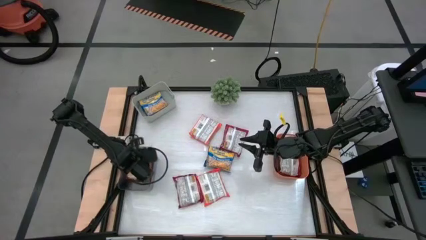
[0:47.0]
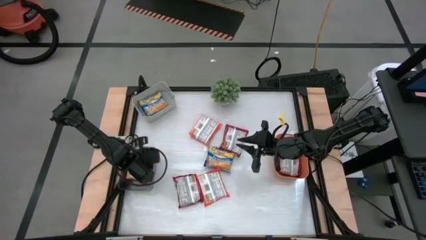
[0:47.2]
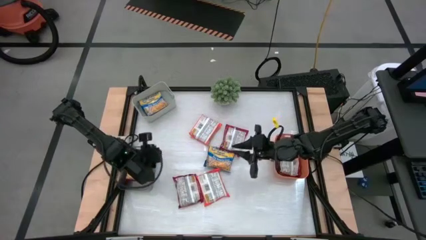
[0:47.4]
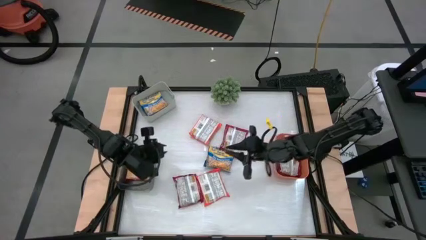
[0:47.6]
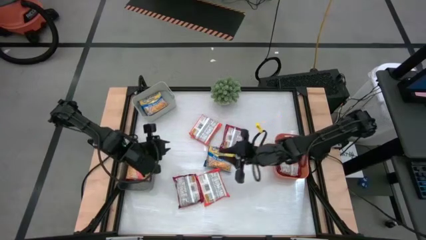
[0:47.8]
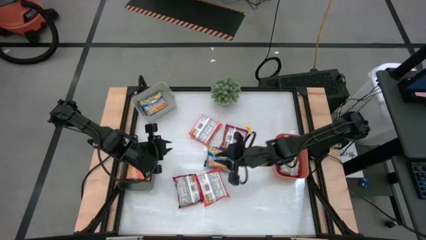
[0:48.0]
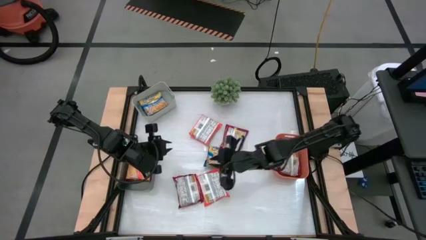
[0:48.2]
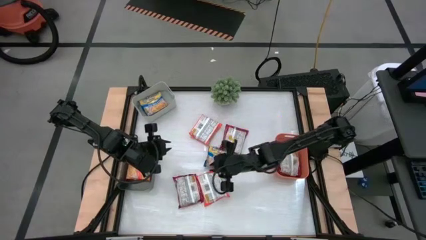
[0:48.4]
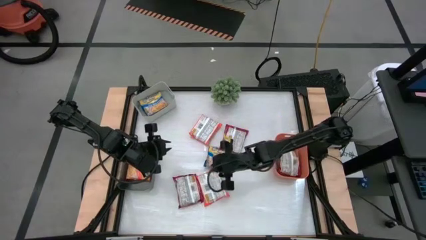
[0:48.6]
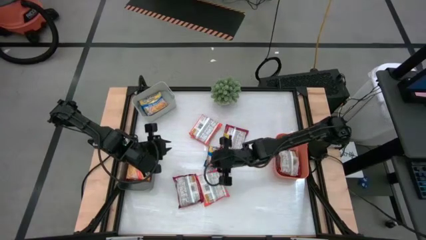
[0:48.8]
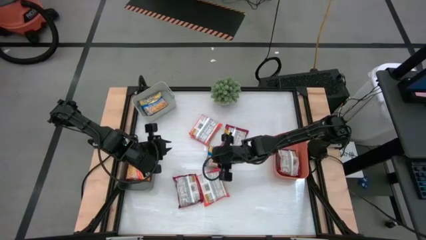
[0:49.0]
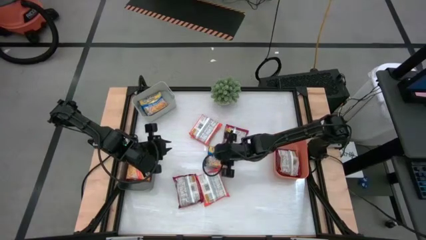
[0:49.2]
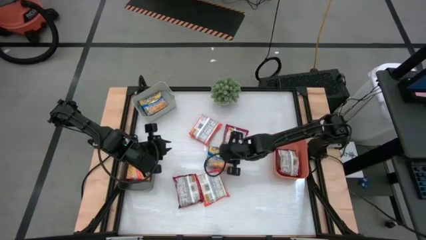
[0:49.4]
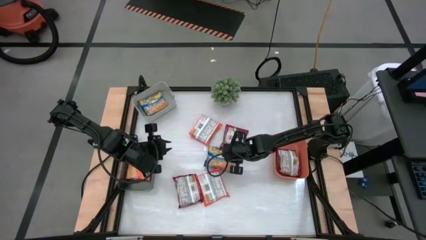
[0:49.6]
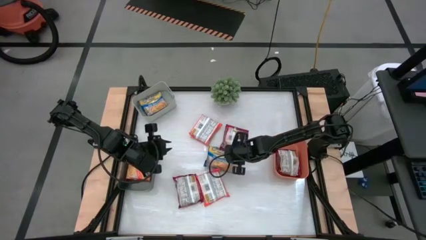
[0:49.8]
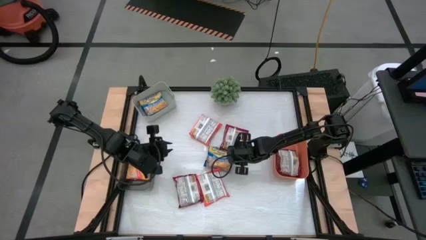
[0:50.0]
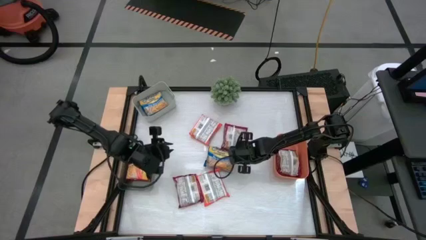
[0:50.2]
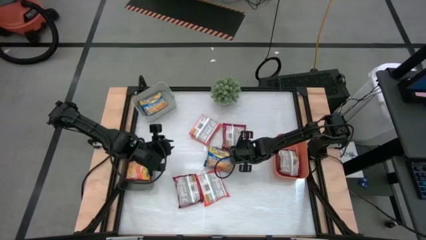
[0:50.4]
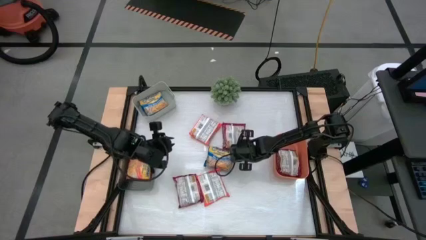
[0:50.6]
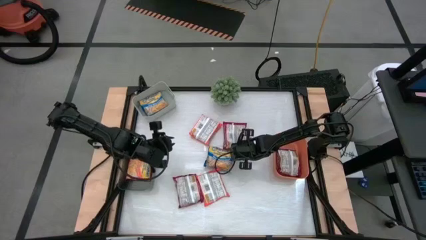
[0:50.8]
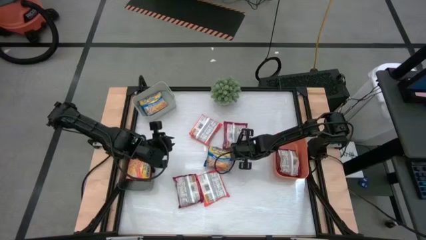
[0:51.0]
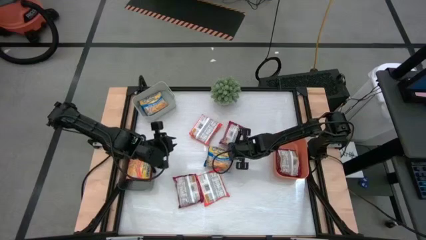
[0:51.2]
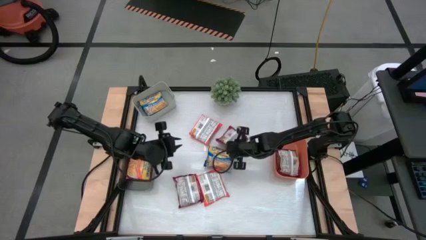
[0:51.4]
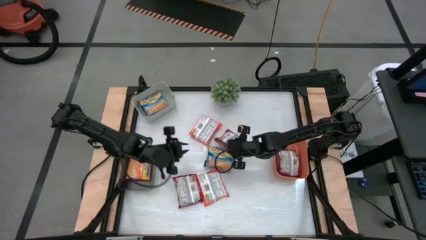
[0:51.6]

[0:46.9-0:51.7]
Task: Sort Maruchan noodles
Put the red bag into the orange bin

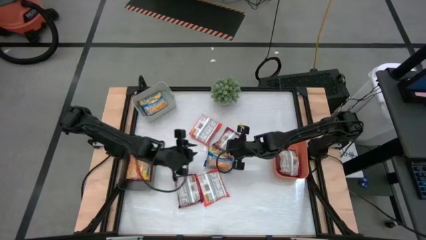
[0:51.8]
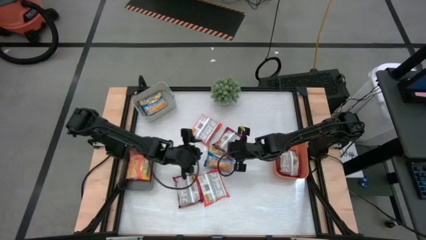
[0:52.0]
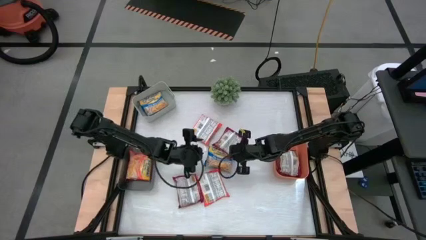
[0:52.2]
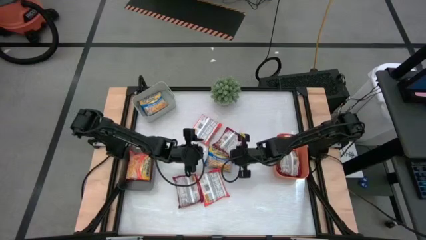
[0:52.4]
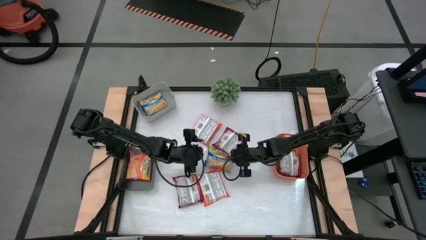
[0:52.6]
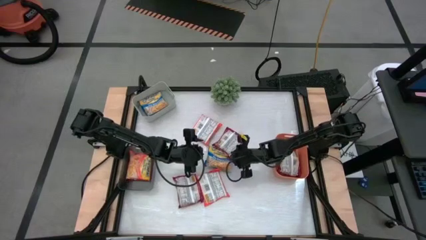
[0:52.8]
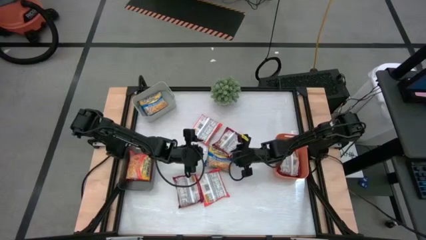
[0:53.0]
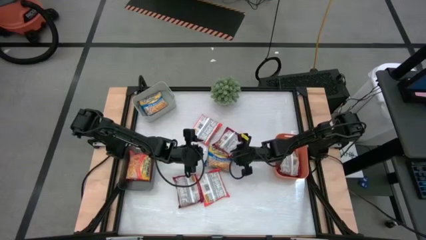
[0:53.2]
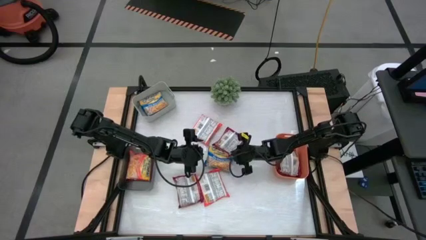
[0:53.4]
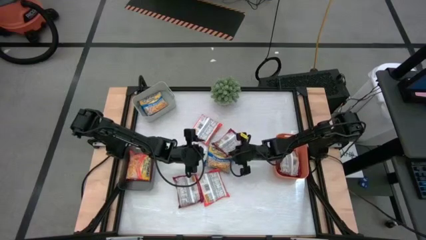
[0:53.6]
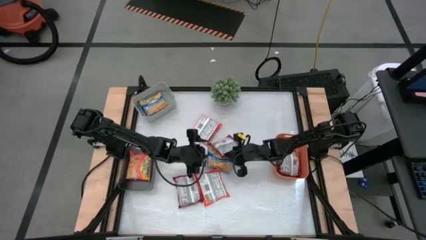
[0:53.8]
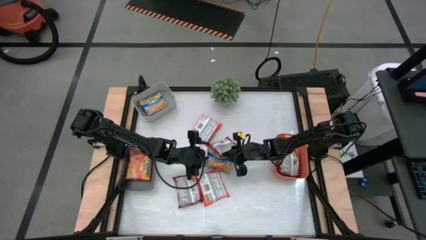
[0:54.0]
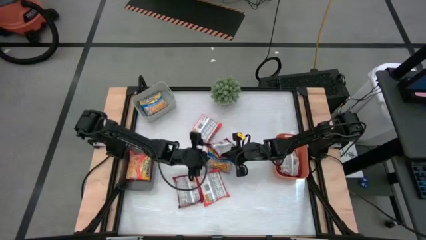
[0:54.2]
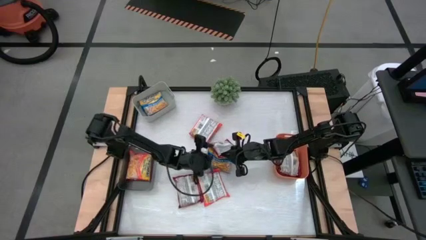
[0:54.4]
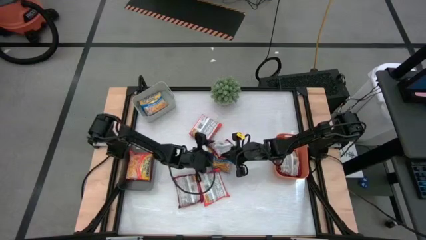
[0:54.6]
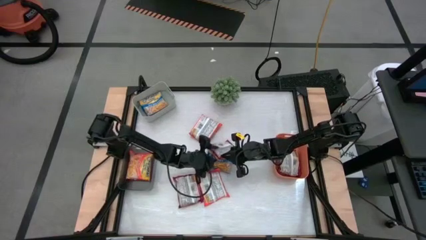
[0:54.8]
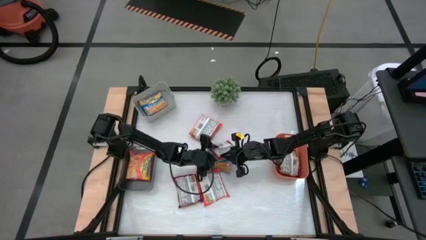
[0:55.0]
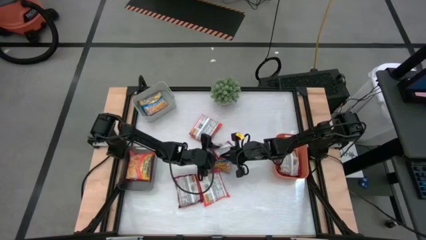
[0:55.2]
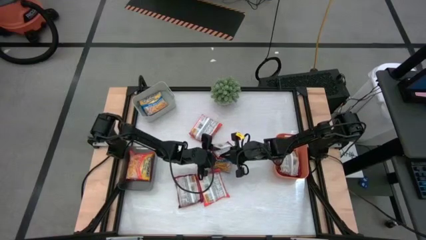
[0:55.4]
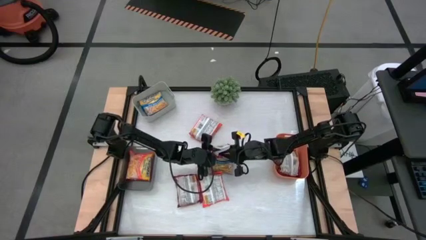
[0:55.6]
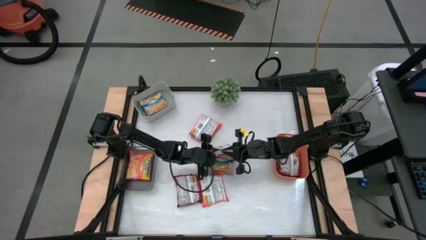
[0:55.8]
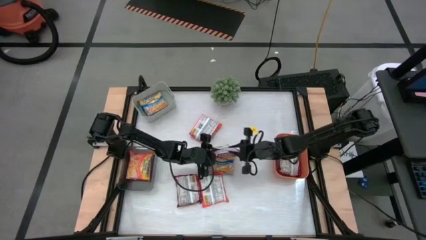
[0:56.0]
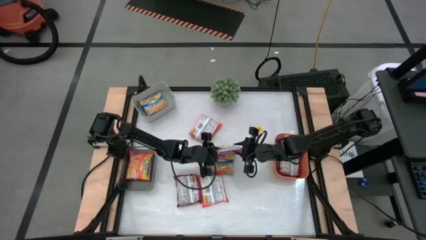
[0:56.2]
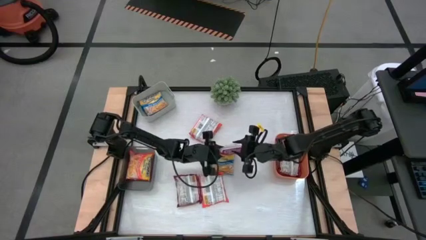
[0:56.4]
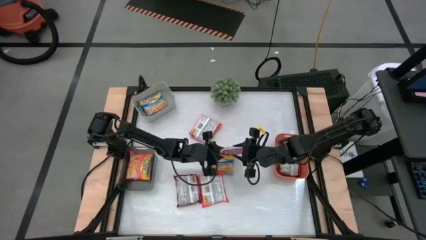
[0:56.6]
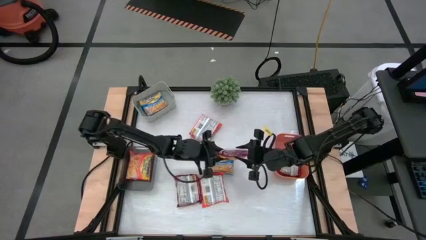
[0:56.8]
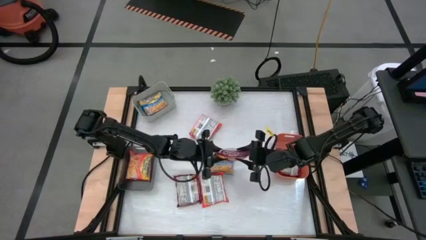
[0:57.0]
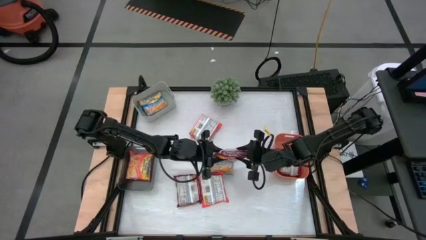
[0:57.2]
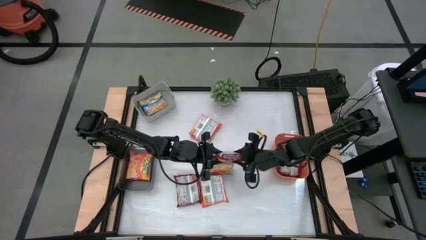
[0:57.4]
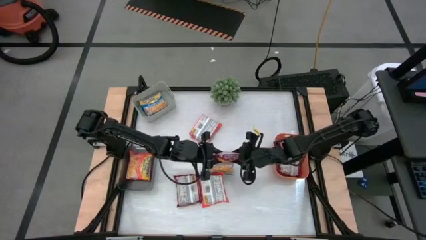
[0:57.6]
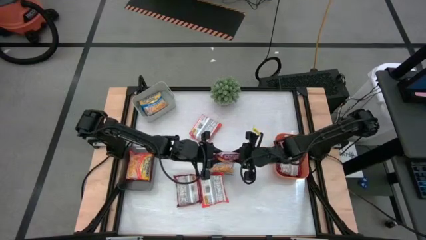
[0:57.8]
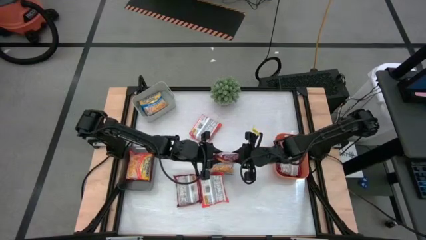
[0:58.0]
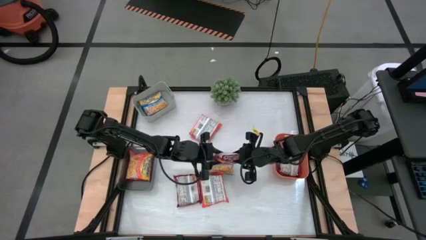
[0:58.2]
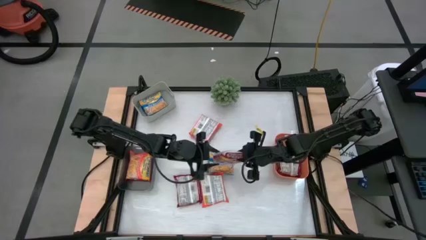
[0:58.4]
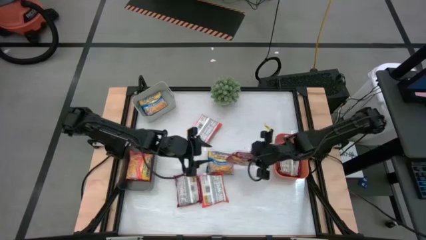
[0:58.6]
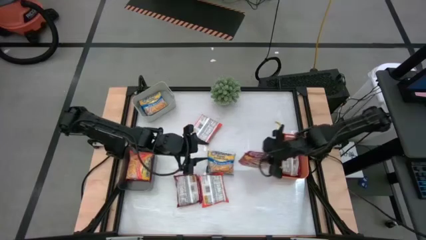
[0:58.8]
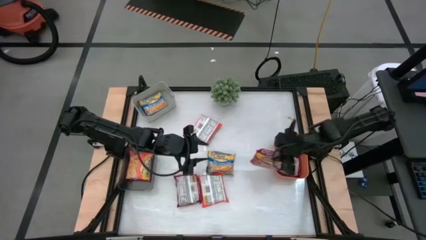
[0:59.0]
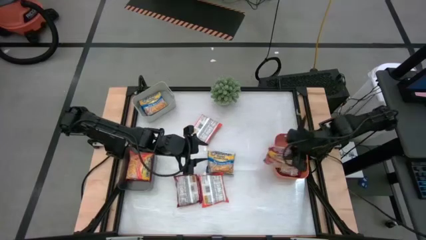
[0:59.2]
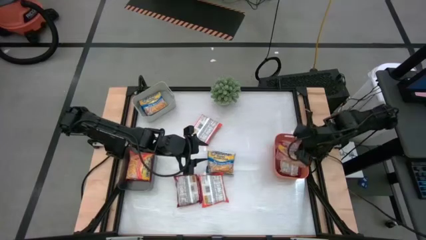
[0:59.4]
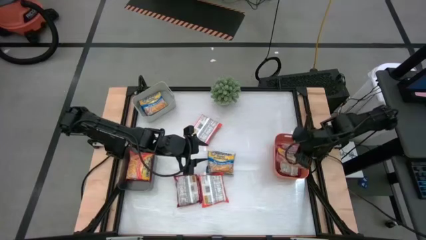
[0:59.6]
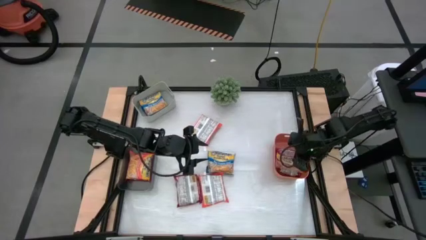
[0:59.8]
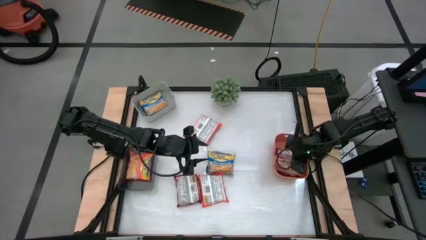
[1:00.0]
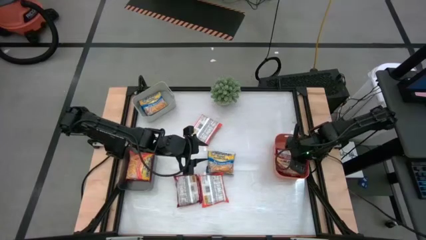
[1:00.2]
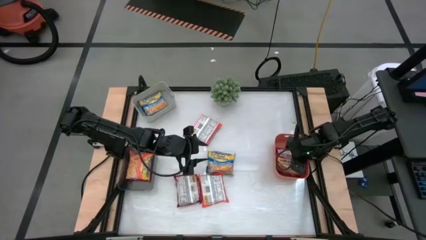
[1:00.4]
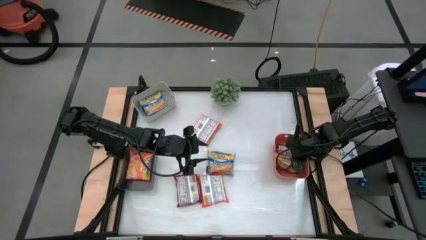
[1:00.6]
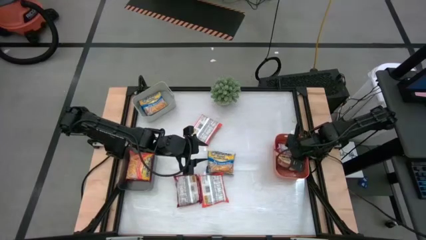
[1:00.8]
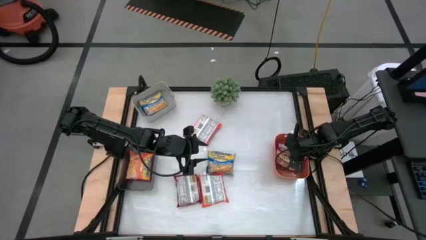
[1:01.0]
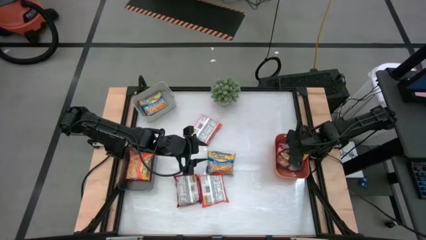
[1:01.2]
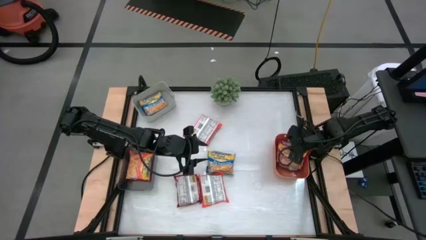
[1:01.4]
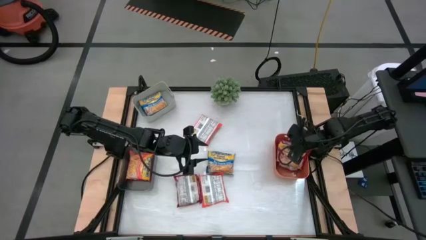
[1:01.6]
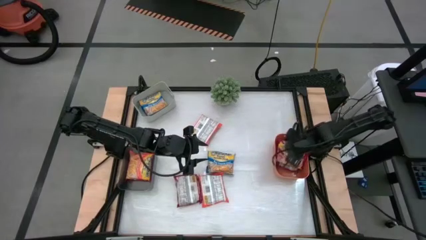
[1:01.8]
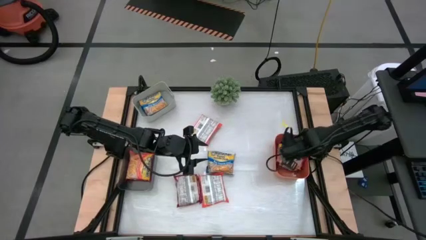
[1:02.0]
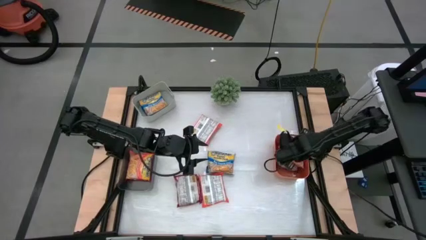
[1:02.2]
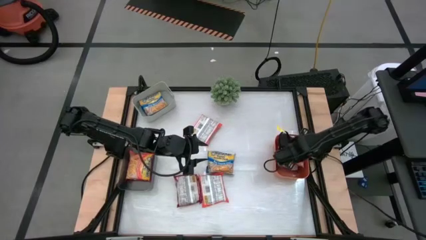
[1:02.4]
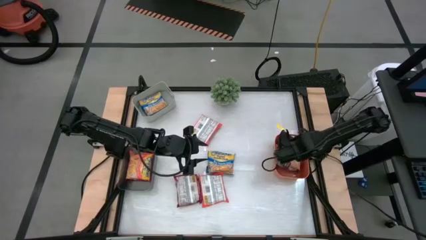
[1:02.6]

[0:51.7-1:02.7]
Put the red bag into the orange bin
